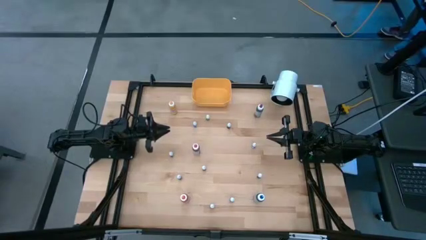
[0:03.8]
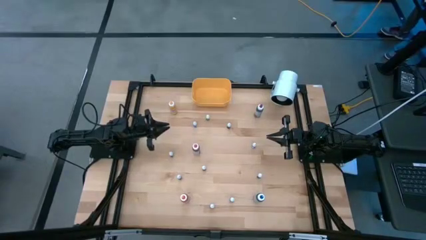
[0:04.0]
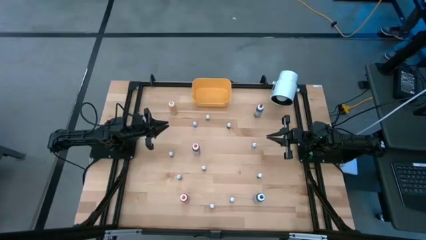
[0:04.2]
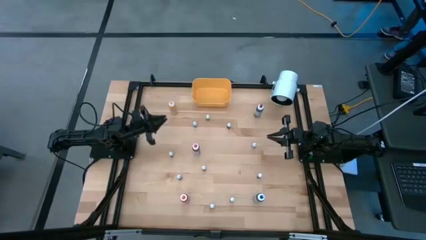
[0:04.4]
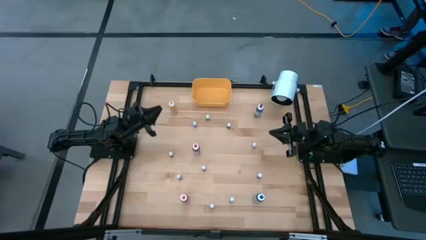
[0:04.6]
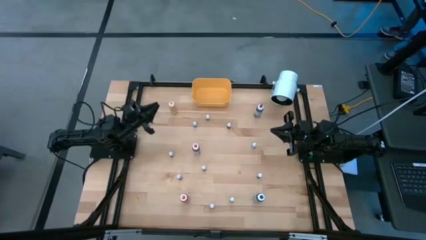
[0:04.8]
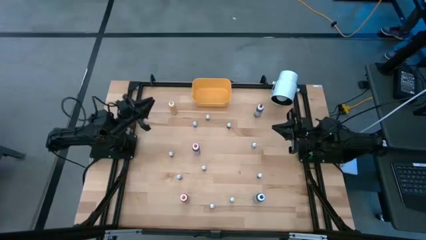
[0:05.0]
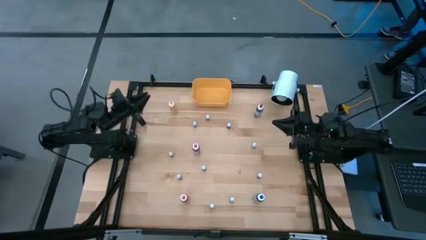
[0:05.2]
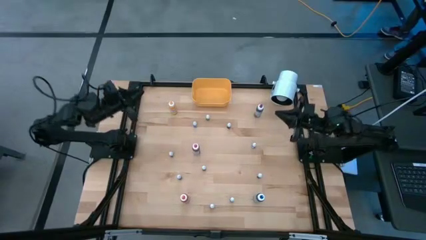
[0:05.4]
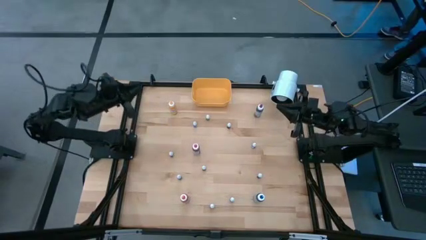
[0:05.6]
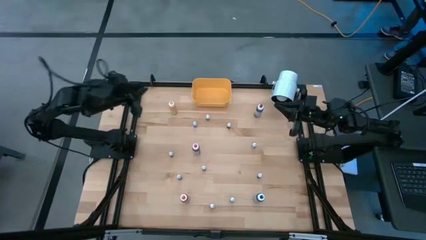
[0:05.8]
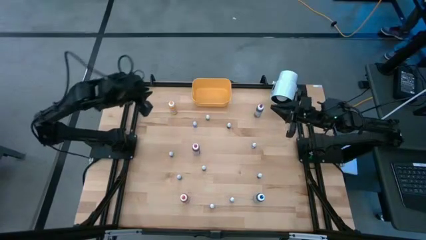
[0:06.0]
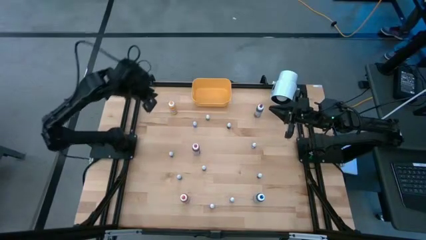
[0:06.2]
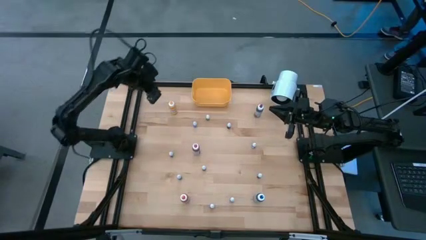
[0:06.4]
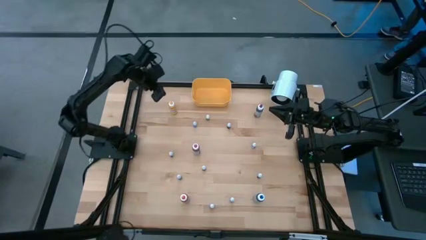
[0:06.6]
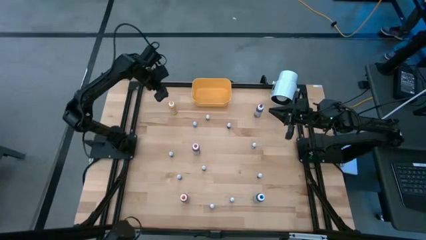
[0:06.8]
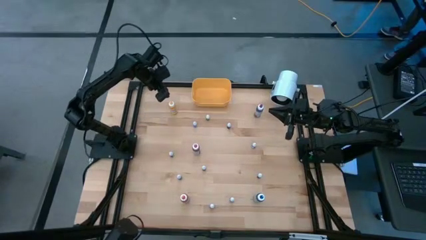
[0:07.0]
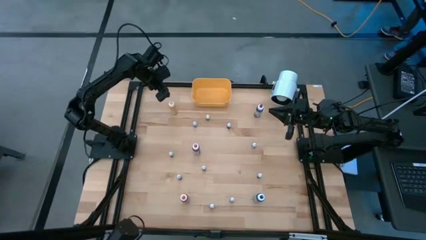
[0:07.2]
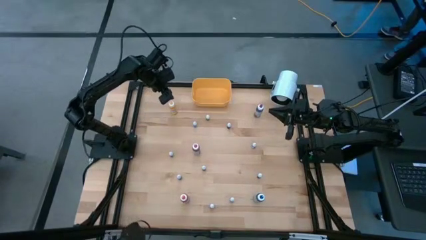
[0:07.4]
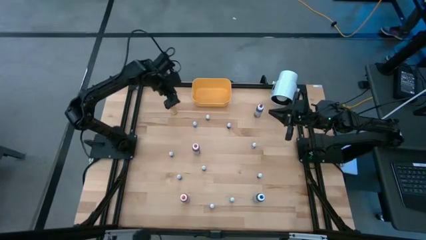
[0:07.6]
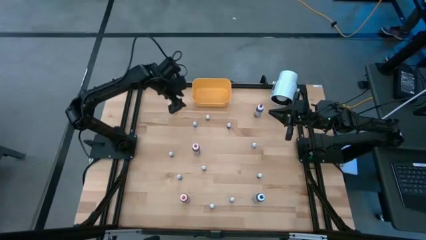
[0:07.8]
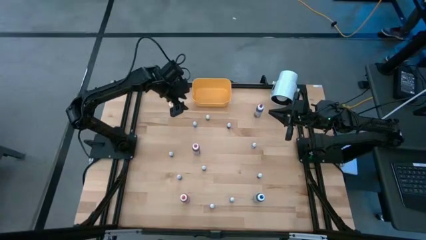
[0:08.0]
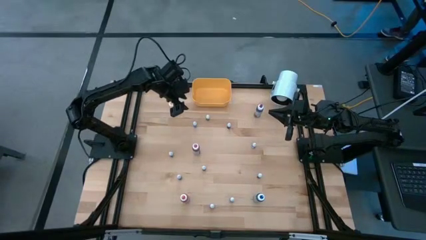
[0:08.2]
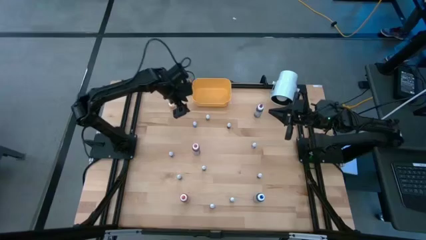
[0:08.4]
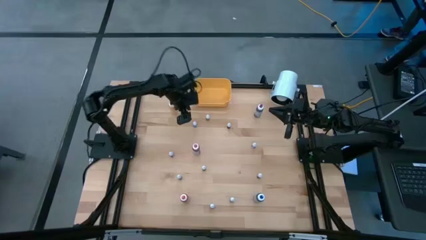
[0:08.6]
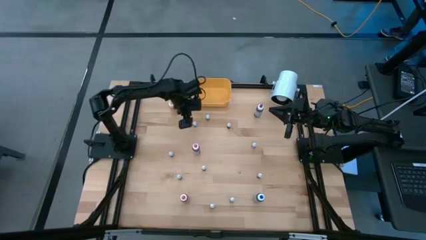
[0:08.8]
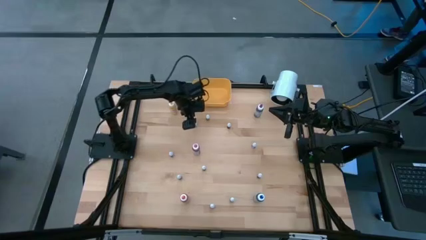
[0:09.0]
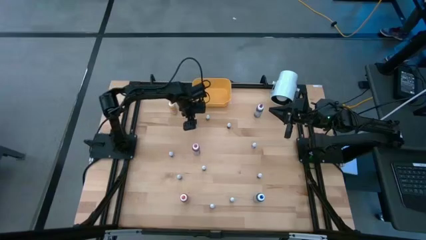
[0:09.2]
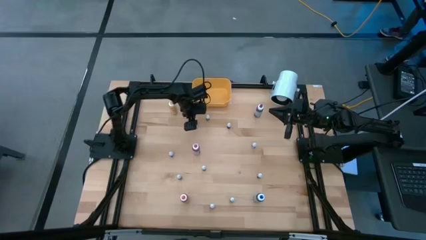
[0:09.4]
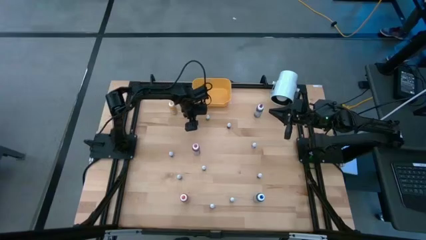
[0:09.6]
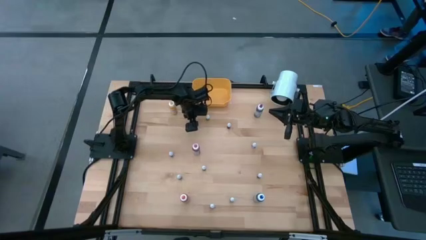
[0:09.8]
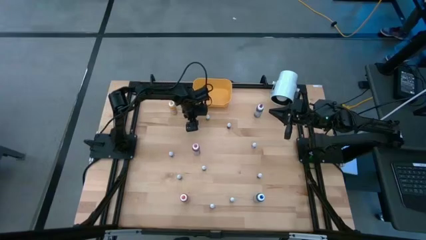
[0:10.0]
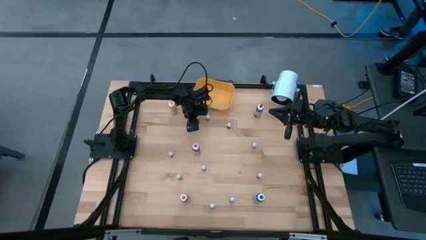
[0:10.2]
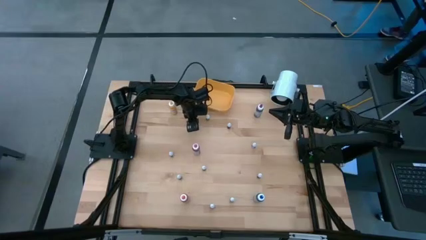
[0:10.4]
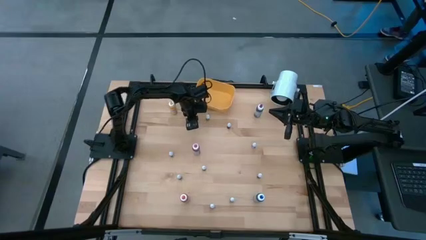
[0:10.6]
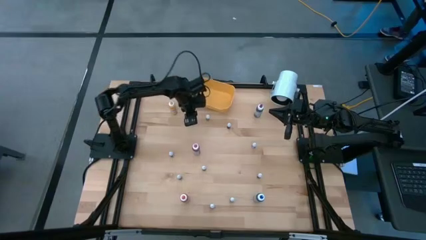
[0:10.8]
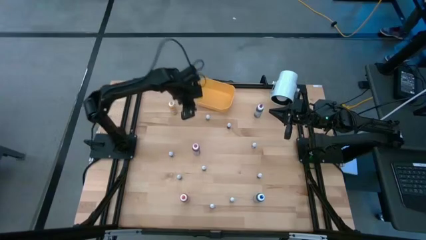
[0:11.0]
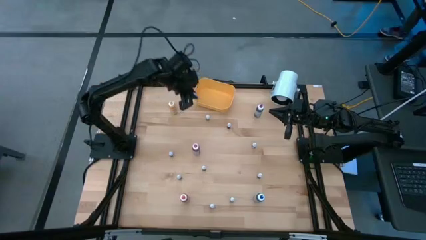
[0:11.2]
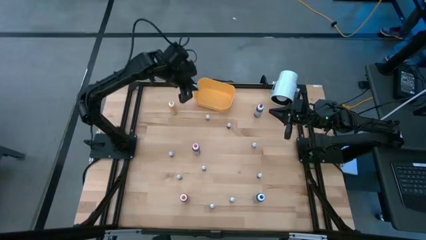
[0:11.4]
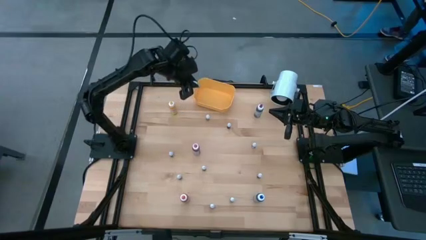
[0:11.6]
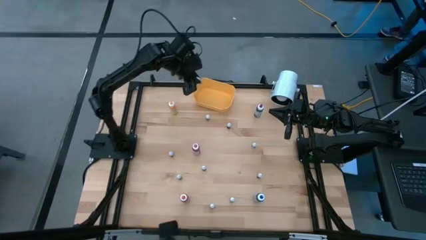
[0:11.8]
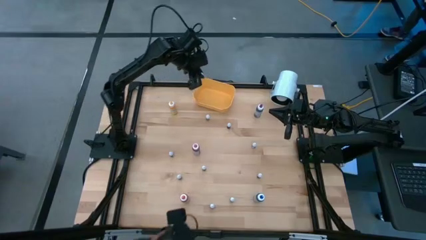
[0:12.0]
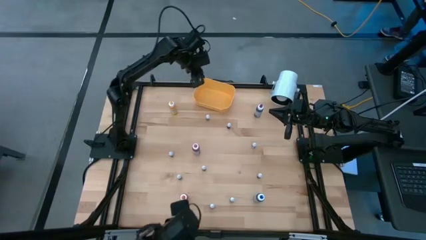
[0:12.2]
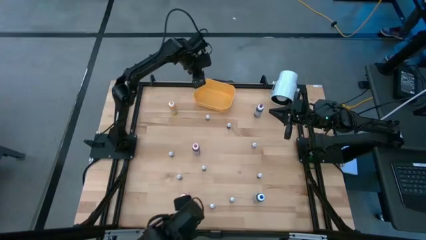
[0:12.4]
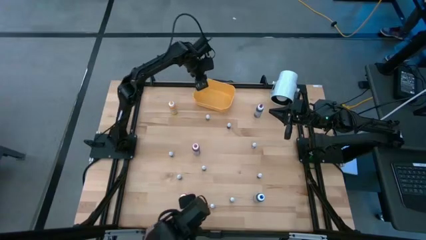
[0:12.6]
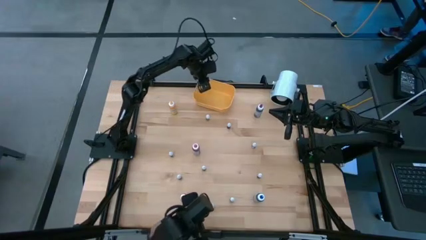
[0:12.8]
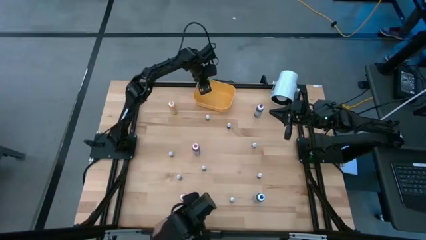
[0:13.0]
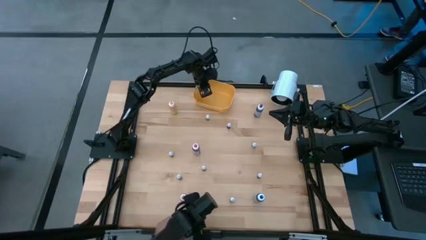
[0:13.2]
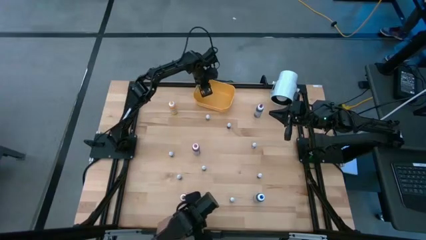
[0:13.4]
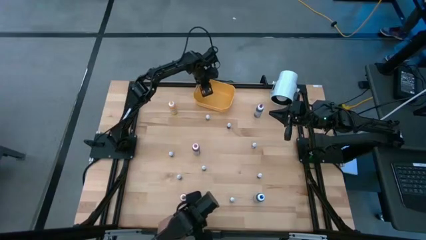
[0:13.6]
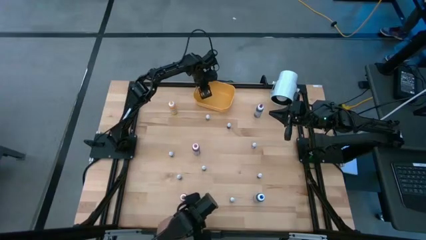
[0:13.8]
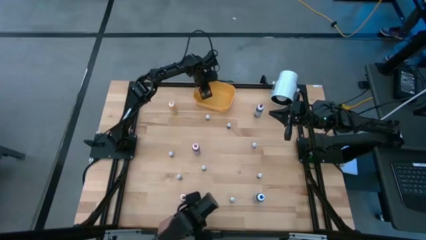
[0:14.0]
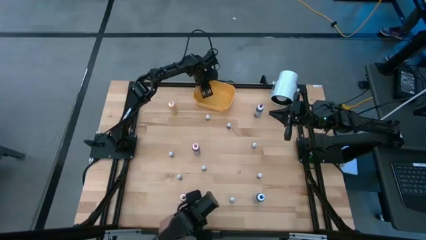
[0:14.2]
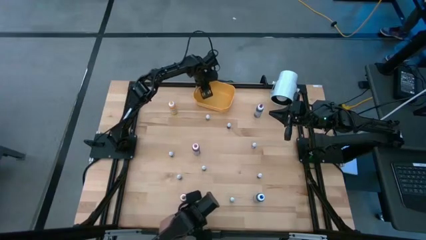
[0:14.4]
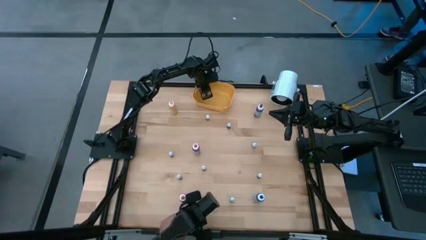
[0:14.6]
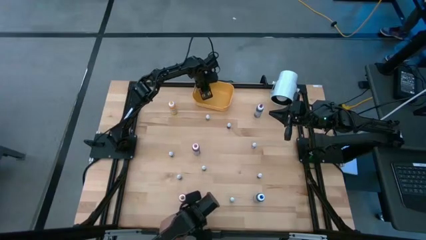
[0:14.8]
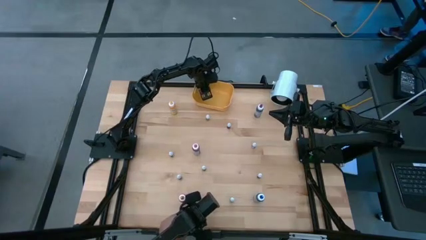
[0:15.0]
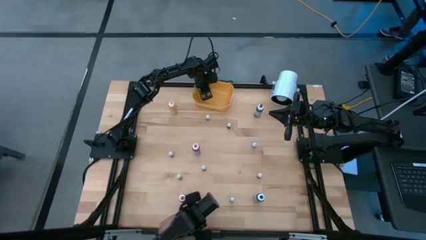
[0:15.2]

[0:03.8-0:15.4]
Task: Pick & Place food coloring
Put the top small blue food coloring bottle into the bin

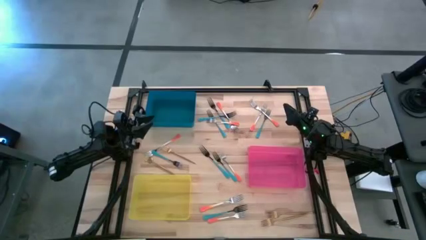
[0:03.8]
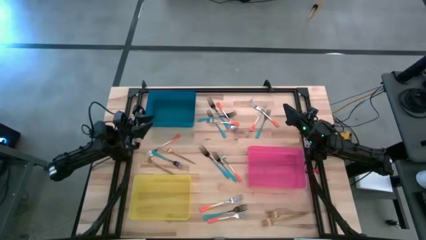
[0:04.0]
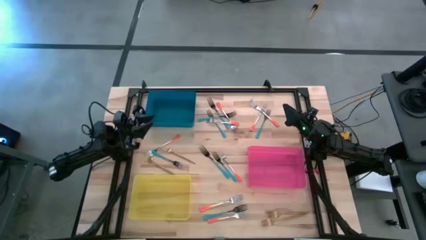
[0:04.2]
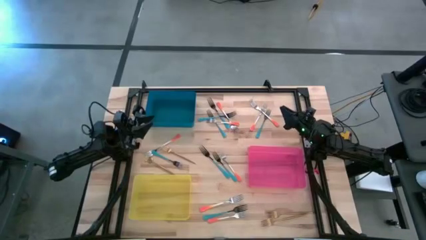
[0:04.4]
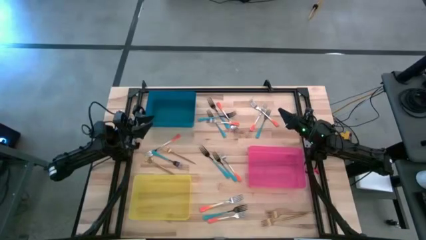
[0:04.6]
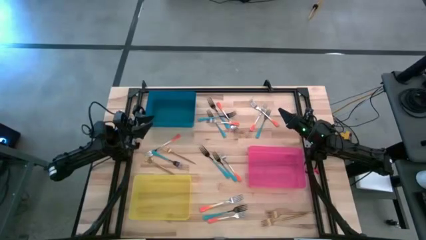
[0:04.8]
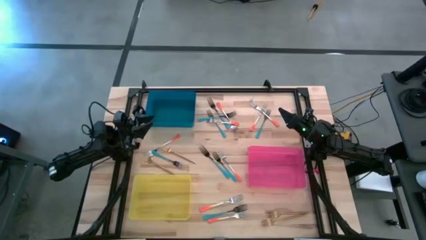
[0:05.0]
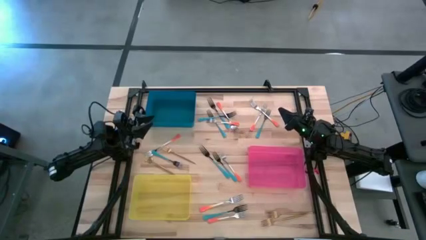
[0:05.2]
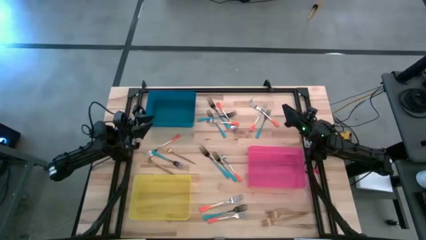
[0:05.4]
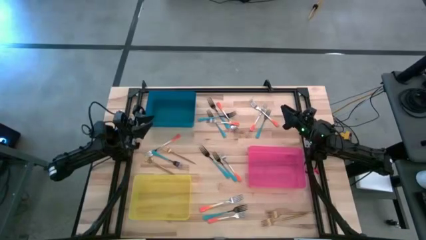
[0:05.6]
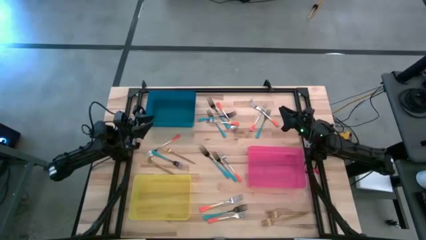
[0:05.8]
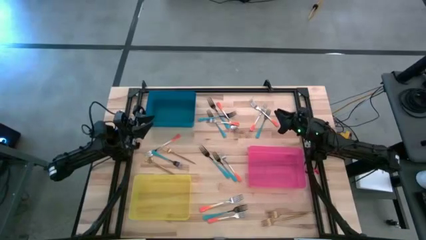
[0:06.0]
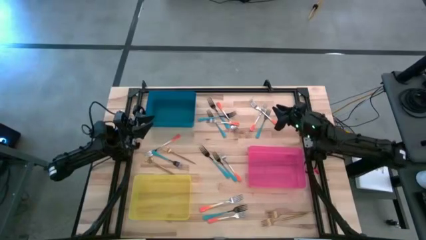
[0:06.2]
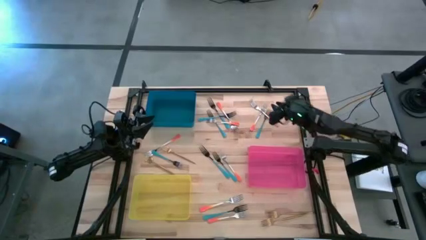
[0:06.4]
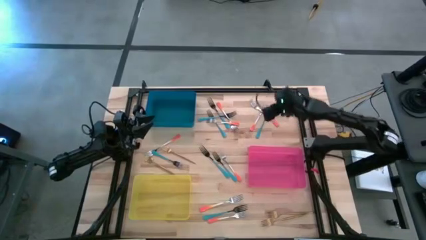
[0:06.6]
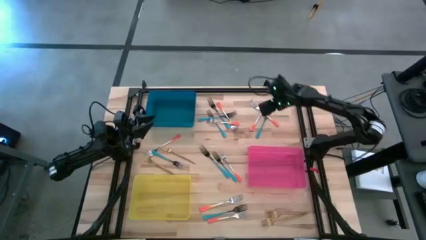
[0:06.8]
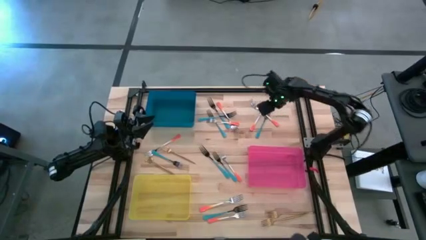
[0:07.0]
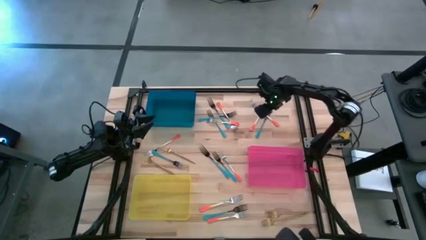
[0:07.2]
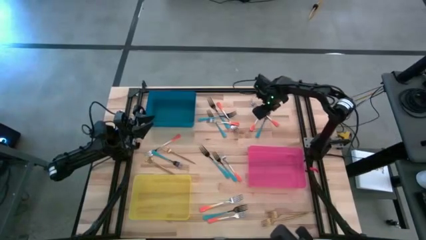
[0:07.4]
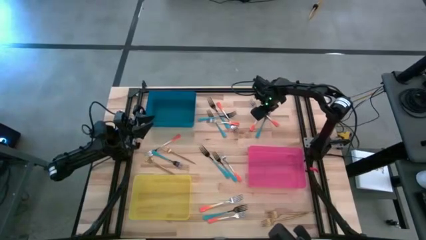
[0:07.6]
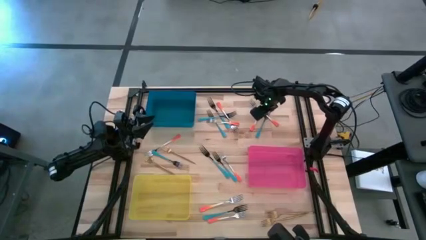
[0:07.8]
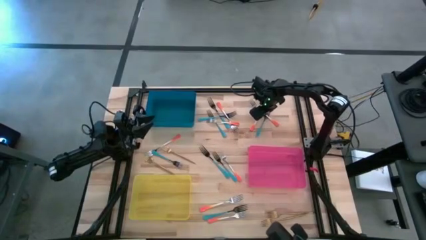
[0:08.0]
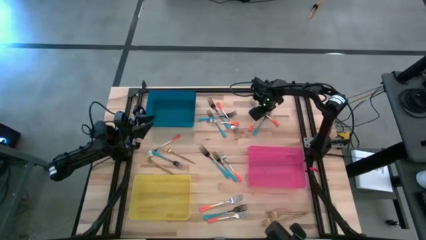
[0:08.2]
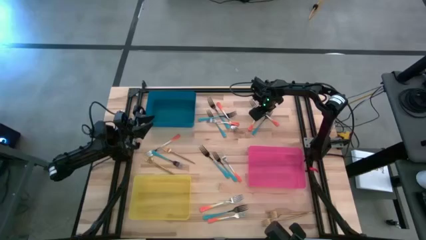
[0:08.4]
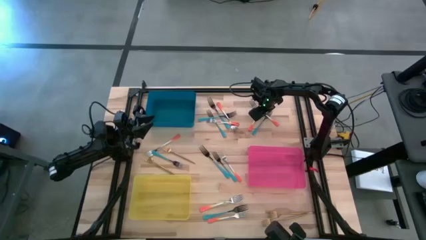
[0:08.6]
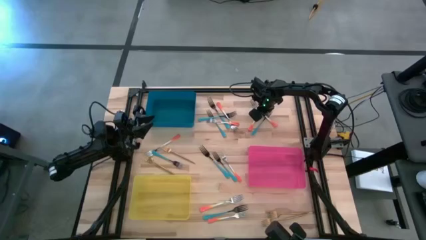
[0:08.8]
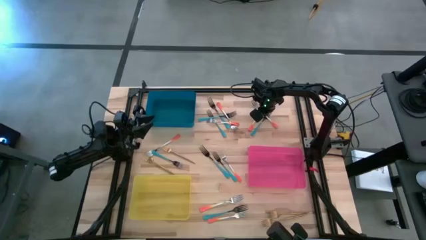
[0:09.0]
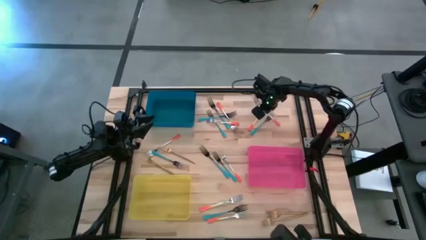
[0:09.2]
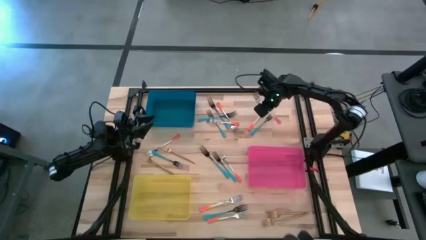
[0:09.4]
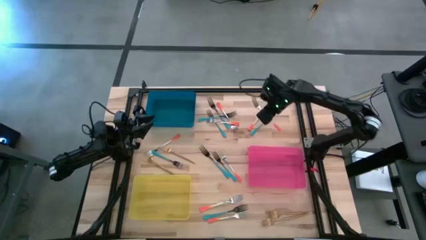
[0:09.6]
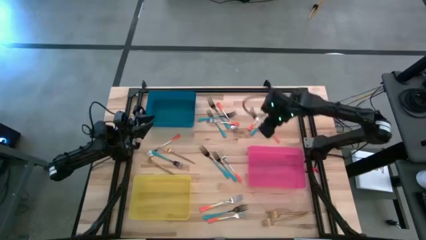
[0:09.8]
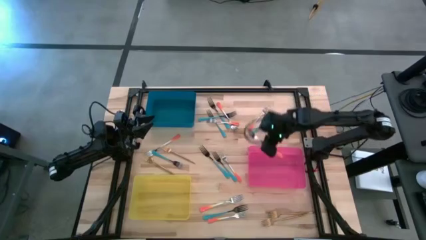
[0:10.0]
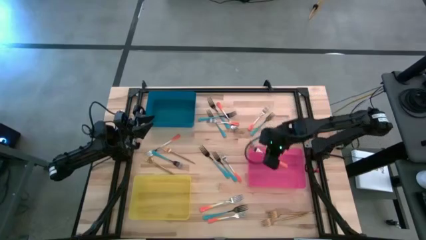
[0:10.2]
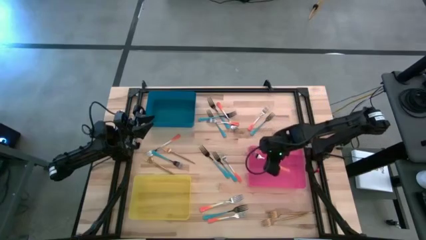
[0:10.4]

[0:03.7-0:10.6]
Task: Sort silverware by color (type)
Put the orange fork into the red bin
